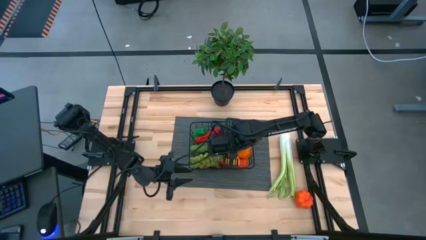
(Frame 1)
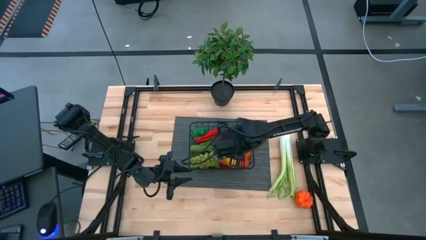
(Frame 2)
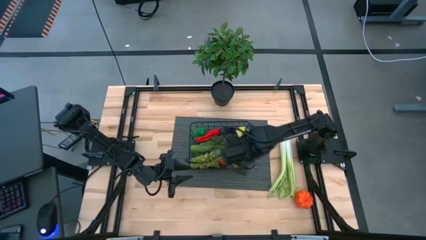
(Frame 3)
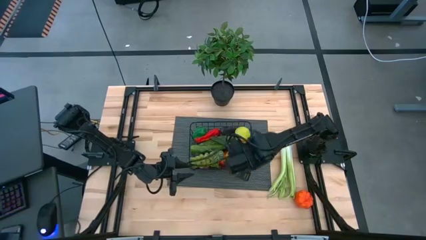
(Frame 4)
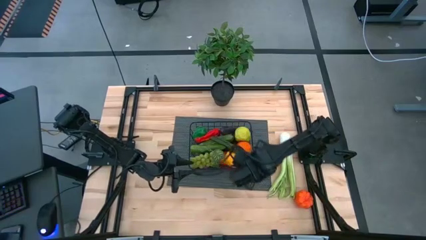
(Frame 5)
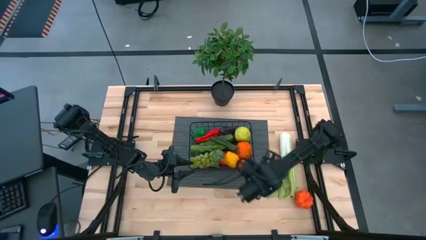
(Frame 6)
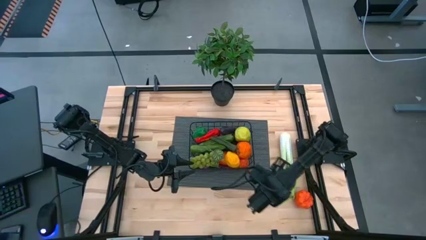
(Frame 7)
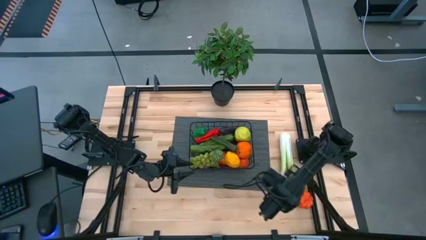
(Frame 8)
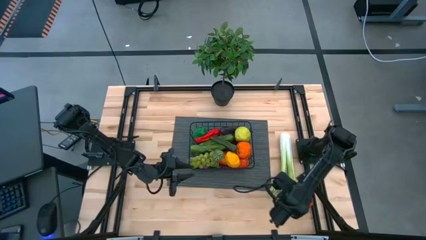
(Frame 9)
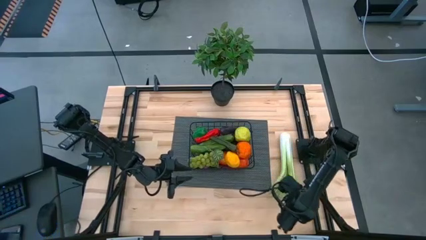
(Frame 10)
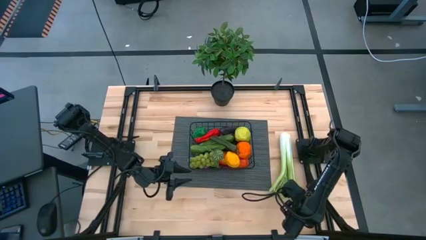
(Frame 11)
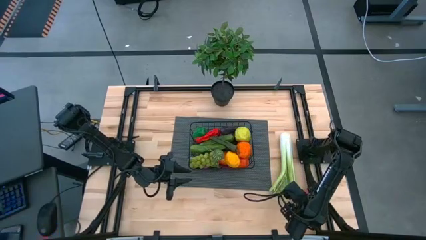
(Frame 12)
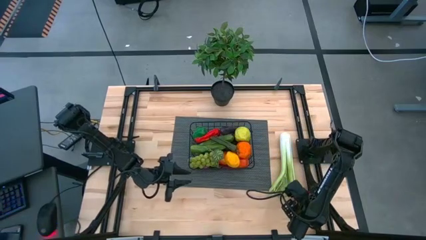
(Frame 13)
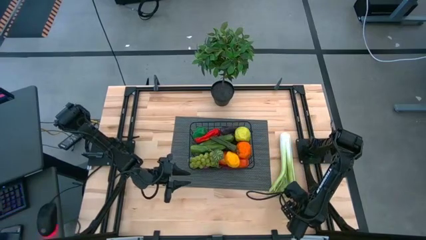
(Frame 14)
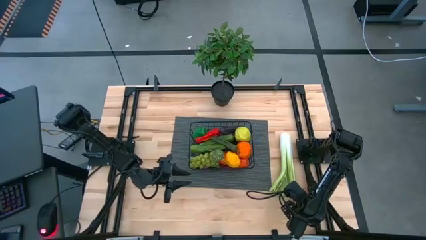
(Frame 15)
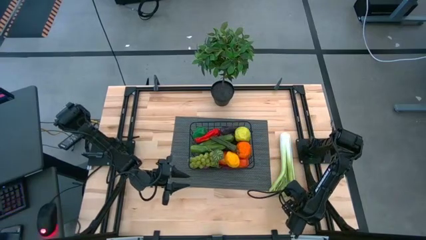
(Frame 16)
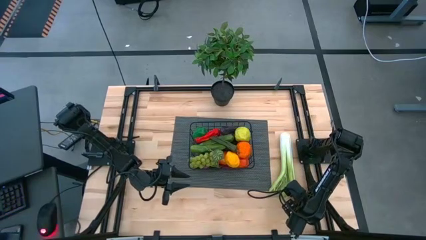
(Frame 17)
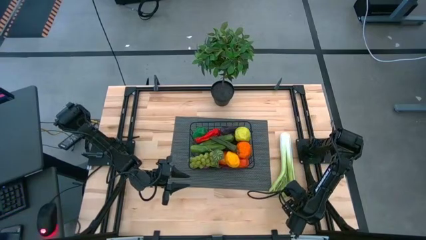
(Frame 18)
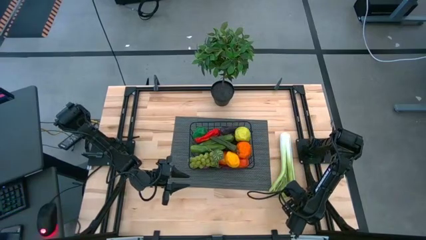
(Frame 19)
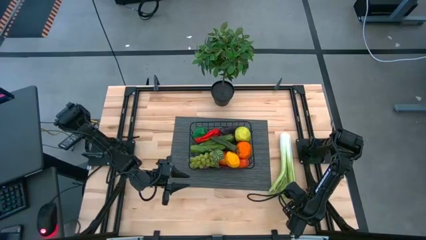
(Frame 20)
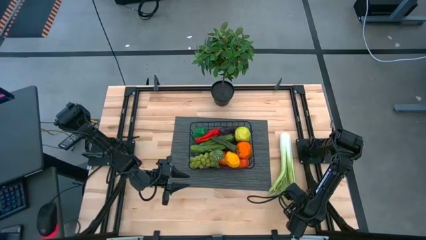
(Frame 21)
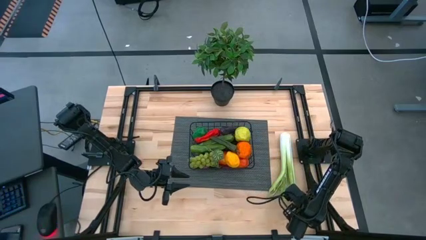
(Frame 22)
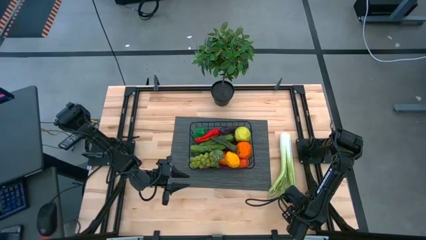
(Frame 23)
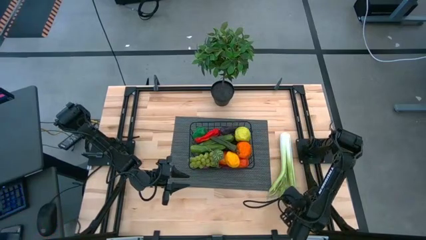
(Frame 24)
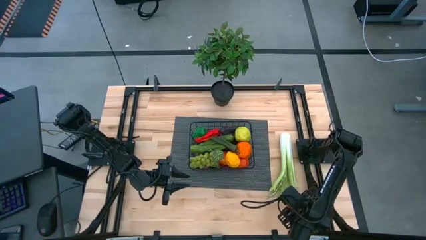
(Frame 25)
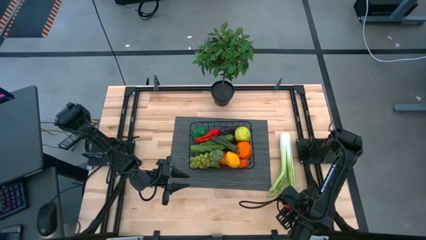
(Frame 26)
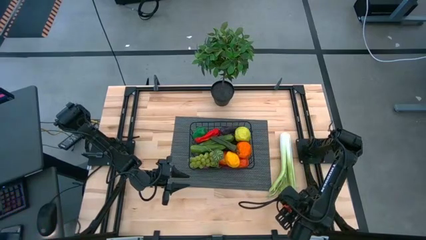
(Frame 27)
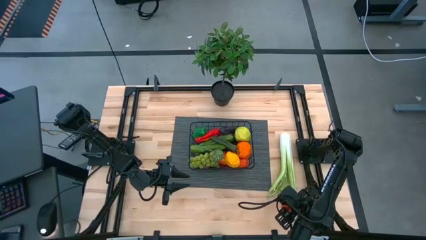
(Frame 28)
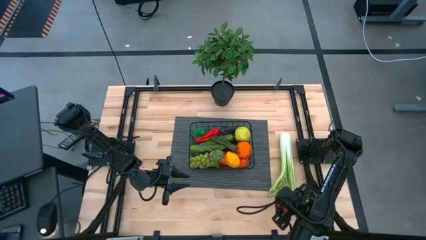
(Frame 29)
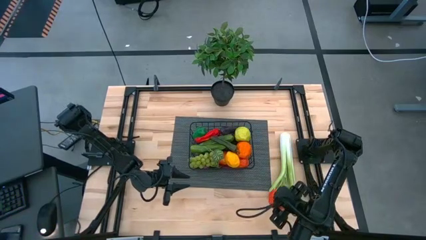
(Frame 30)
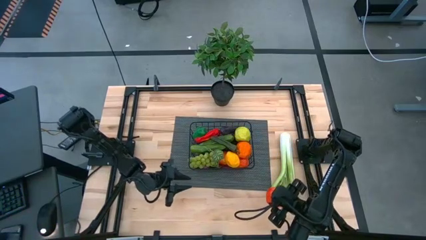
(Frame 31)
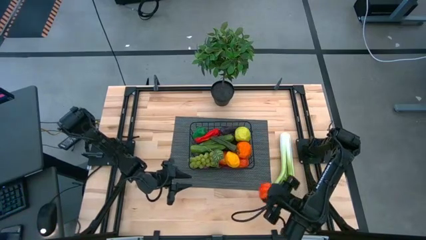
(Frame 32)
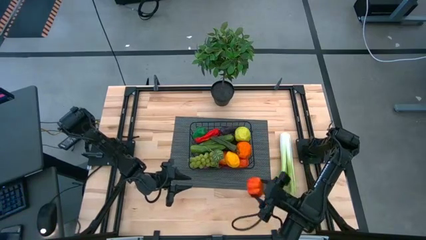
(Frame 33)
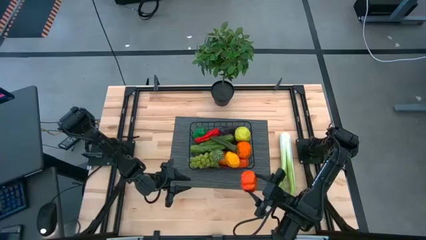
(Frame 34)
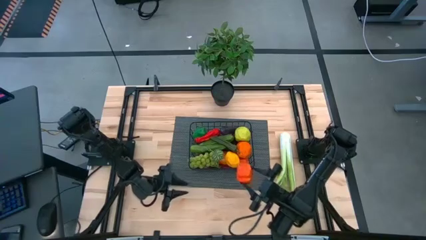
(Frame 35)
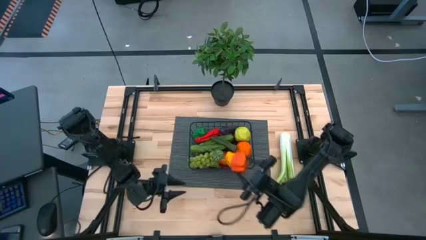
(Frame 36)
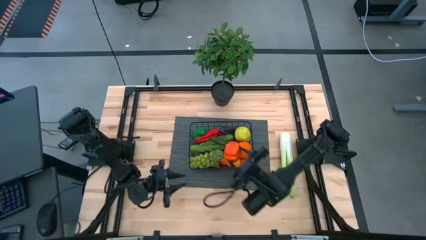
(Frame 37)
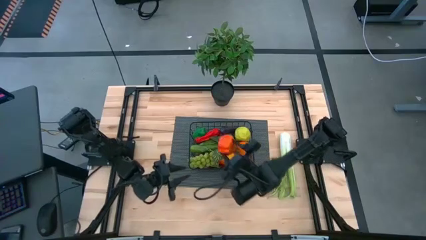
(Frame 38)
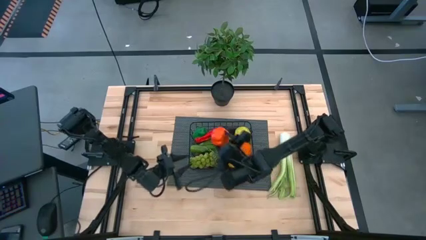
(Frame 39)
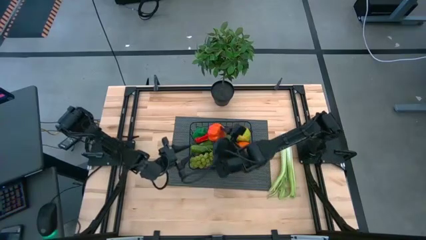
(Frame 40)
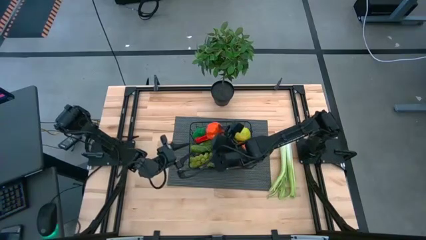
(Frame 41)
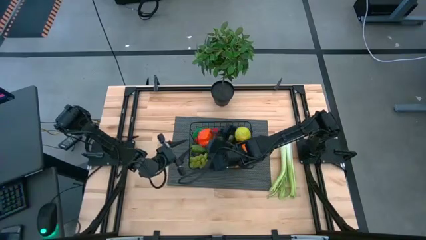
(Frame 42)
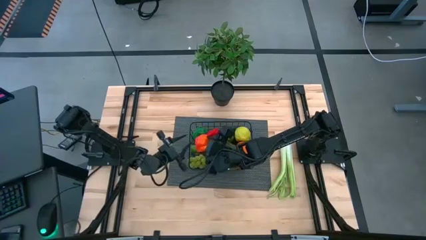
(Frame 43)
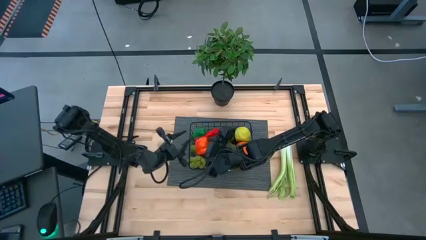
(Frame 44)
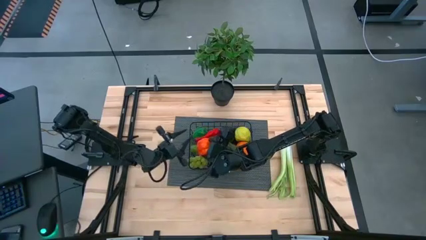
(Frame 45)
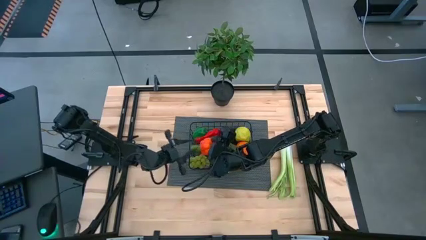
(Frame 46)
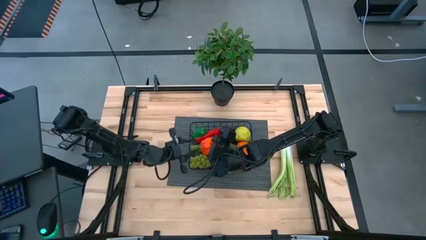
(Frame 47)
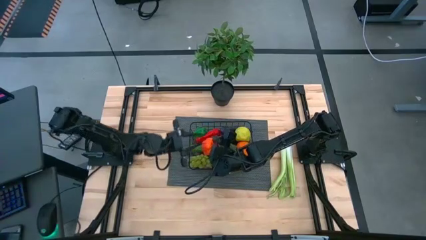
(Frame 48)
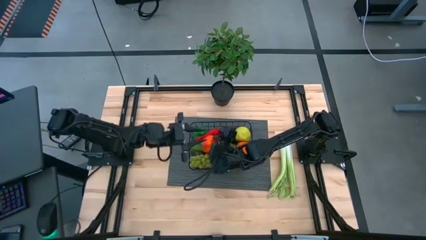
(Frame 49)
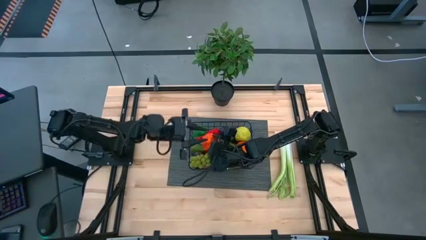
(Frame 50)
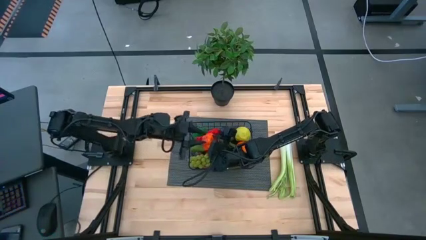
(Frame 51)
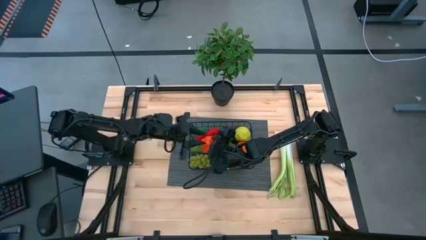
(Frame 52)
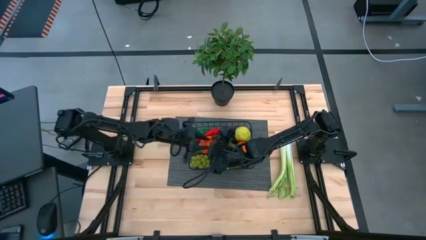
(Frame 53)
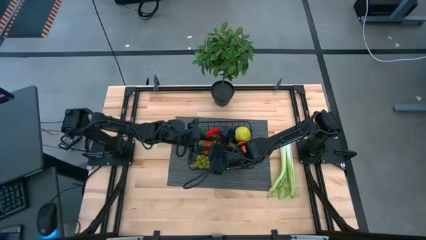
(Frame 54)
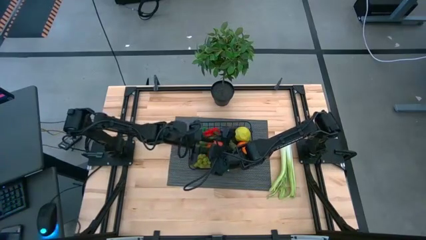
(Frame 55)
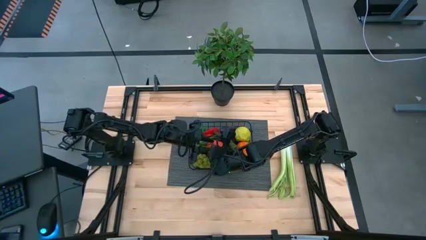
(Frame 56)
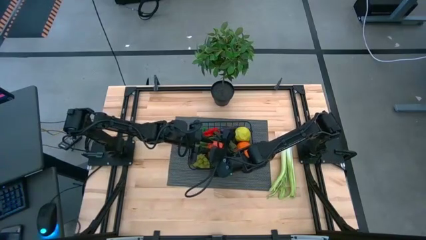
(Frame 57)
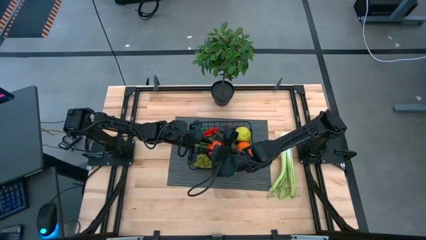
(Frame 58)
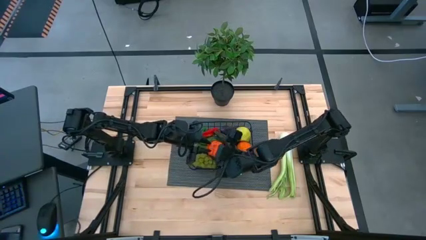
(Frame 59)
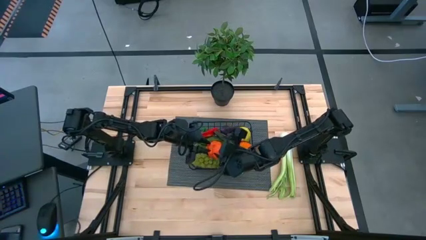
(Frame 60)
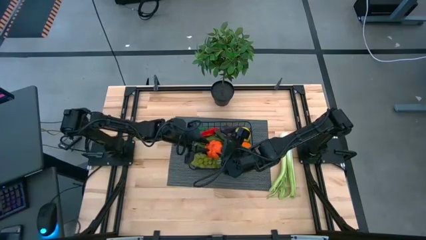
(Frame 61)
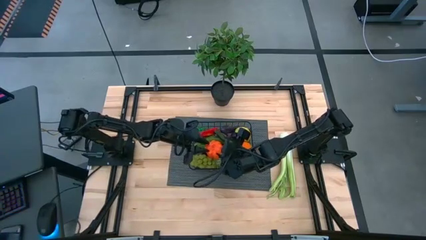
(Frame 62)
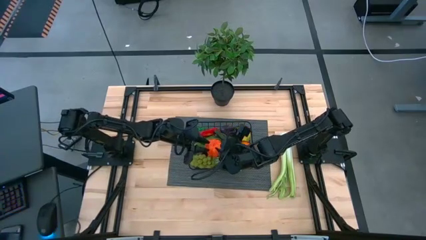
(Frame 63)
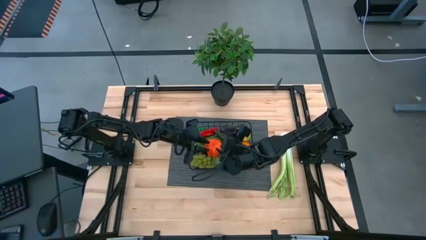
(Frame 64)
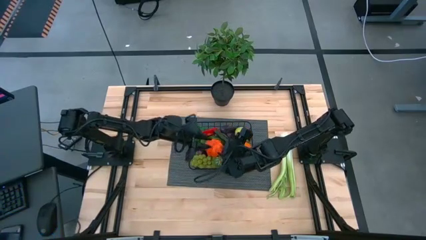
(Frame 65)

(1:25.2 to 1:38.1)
Task: Build produce basket
Put the pumpkin into the wire basket

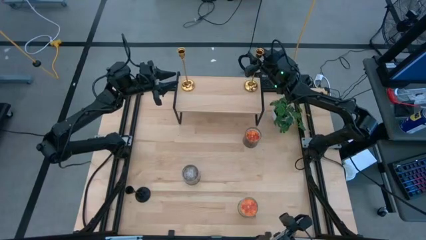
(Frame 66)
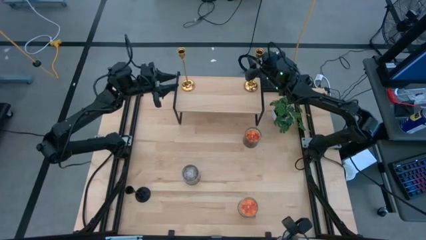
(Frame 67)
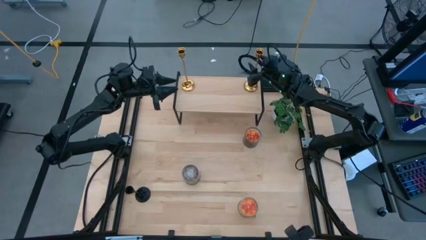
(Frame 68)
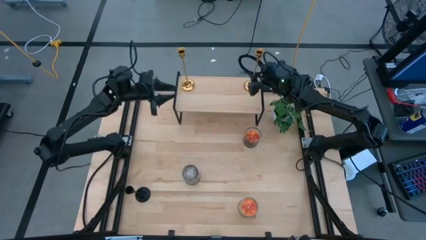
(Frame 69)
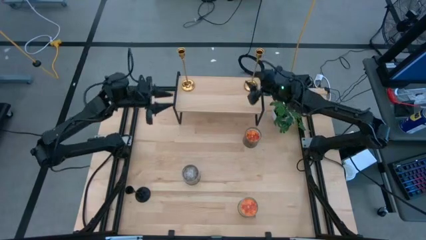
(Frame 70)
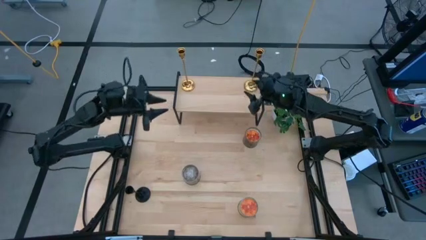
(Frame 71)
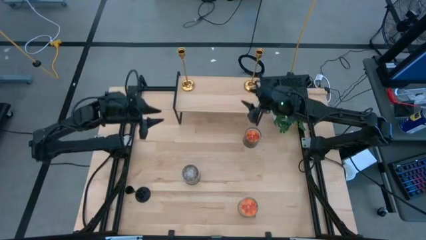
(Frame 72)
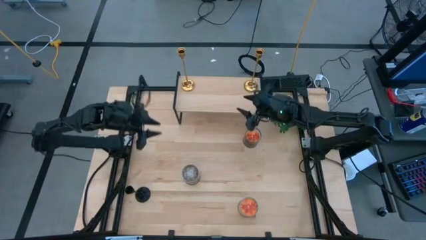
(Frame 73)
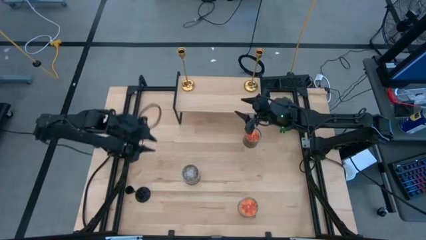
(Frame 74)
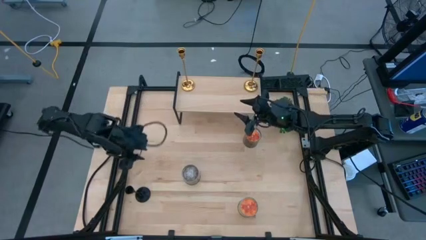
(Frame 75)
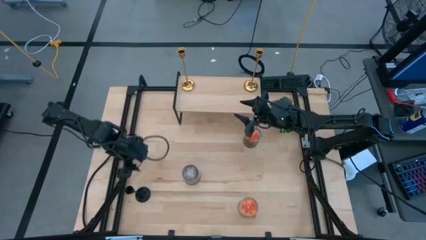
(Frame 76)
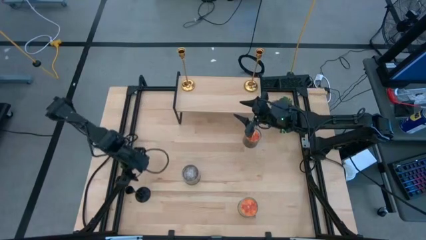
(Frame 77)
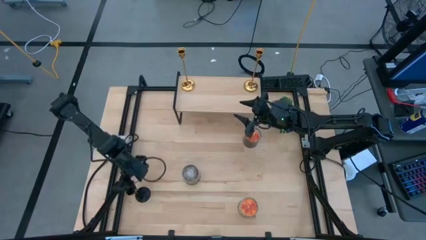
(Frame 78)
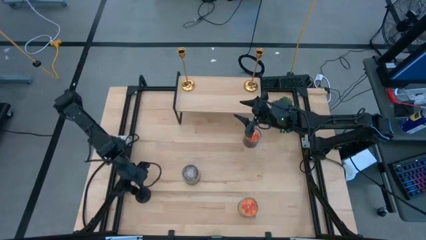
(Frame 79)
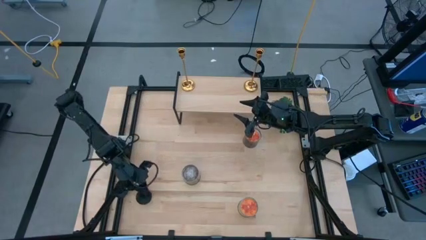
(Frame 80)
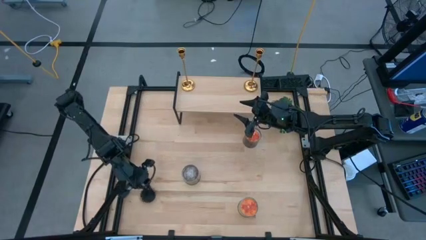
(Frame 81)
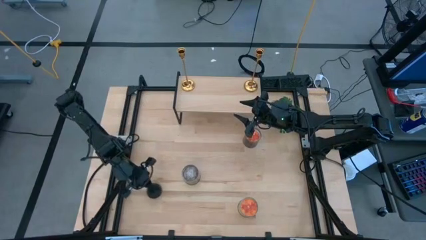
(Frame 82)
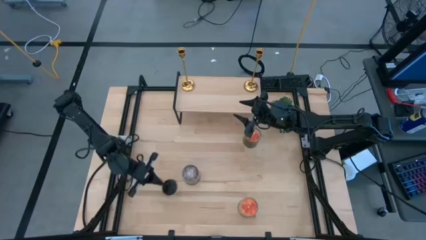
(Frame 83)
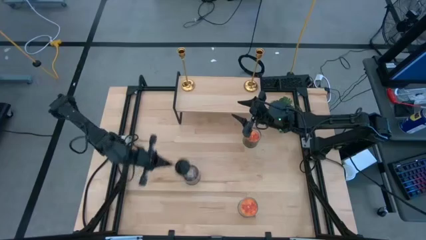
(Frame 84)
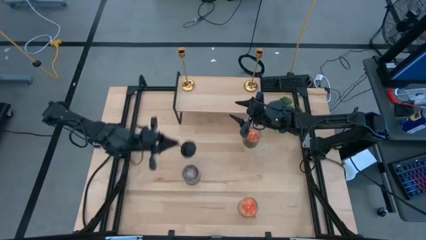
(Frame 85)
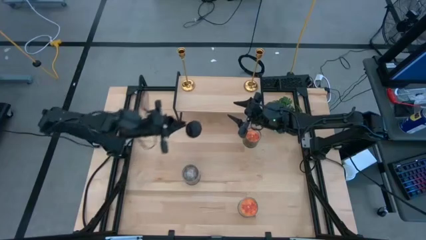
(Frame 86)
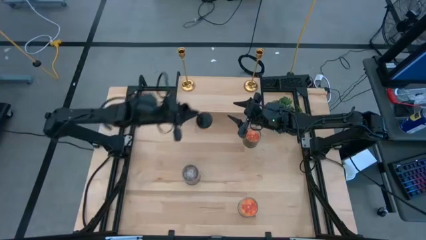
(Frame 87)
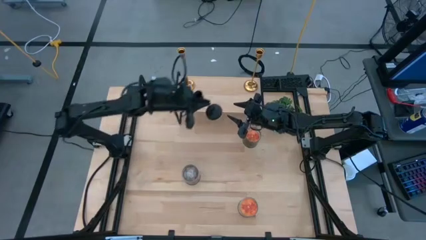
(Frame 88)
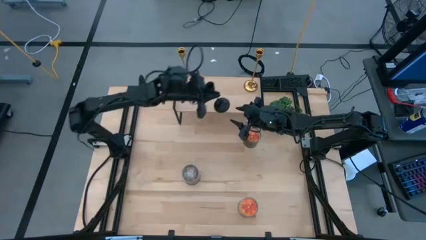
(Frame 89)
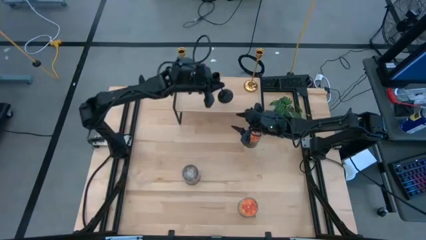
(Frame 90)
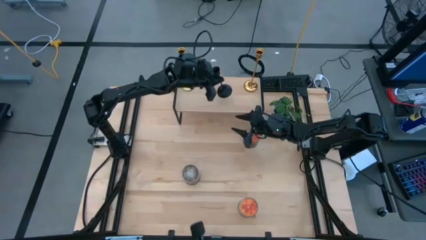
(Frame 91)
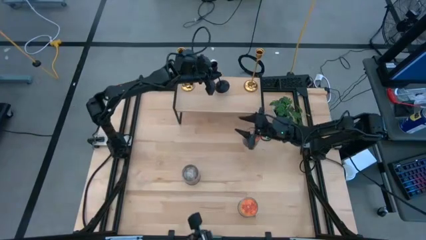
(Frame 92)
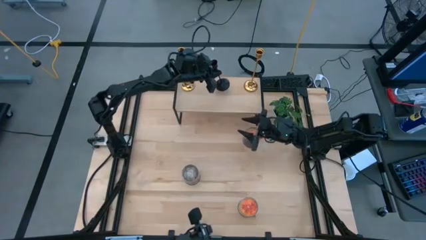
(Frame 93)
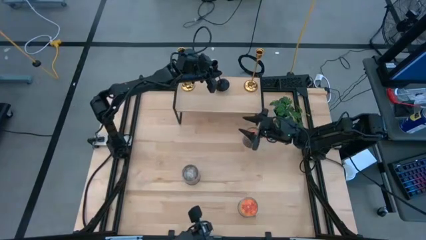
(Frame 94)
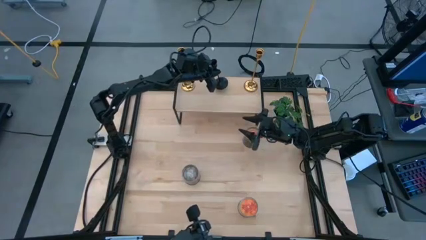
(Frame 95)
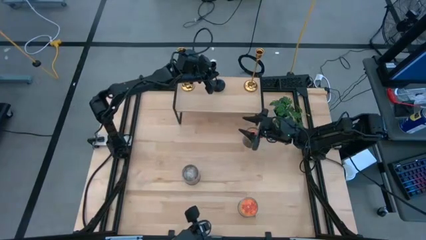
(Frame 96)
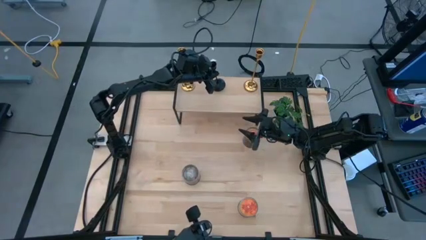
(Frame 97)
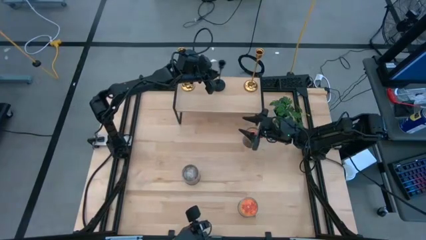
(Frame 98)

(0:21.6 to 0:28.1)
Task: Pick & Place candle stick holders
Put the black candle holder on the shelf
